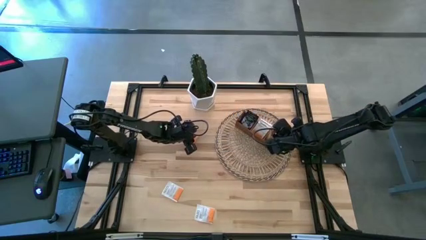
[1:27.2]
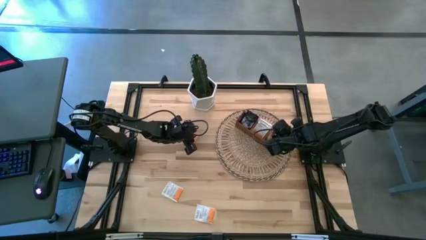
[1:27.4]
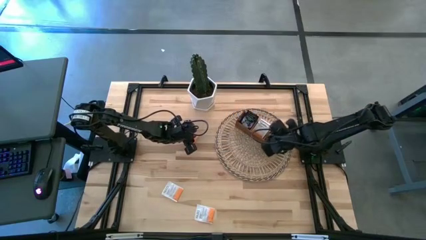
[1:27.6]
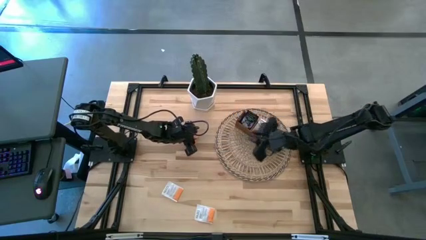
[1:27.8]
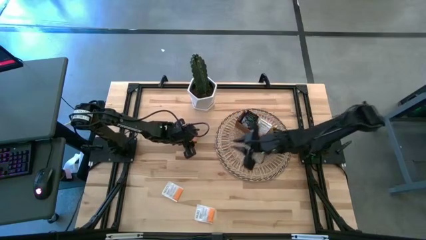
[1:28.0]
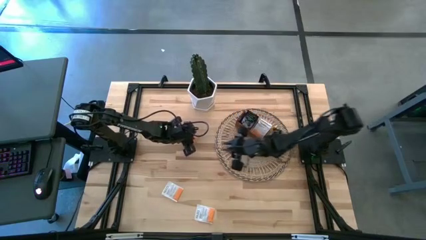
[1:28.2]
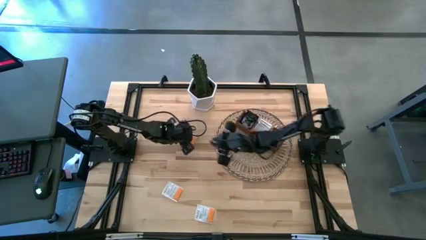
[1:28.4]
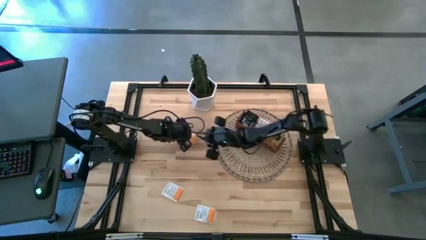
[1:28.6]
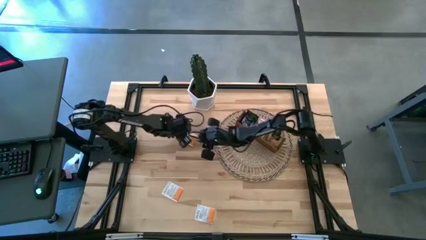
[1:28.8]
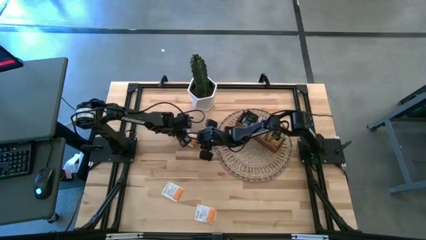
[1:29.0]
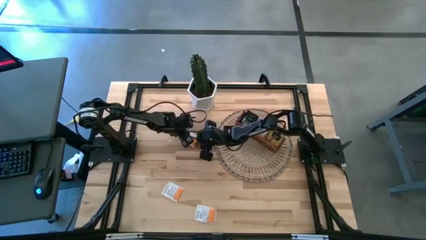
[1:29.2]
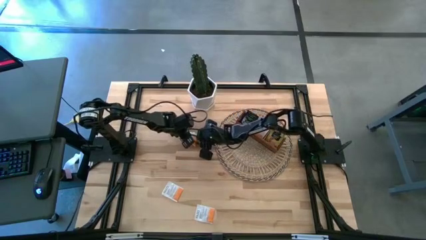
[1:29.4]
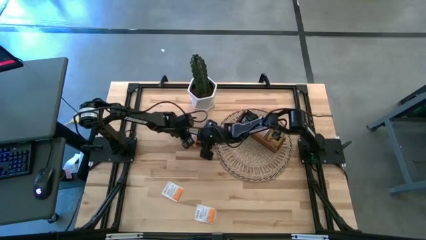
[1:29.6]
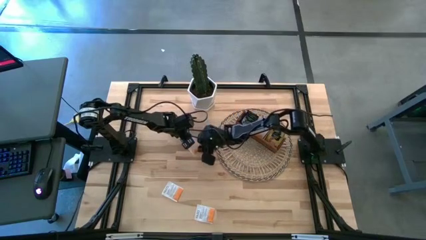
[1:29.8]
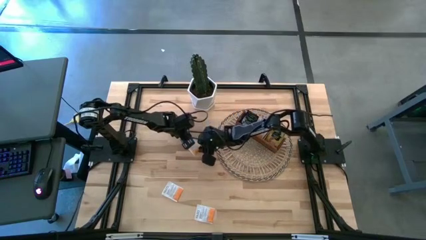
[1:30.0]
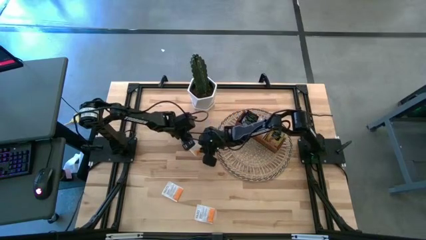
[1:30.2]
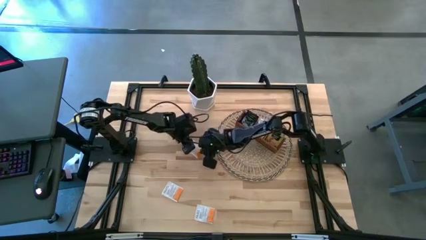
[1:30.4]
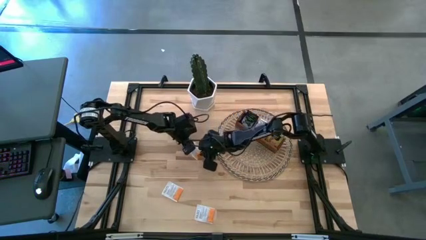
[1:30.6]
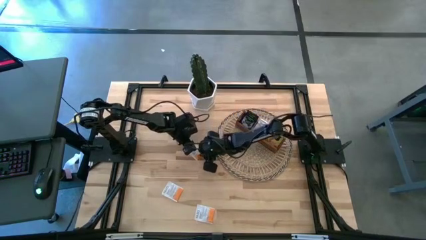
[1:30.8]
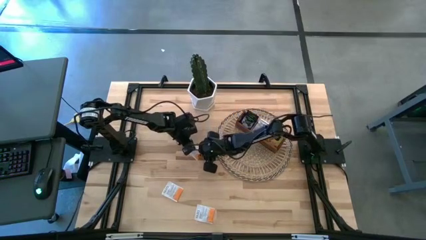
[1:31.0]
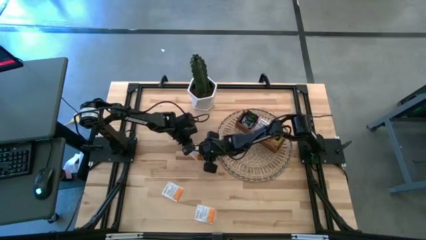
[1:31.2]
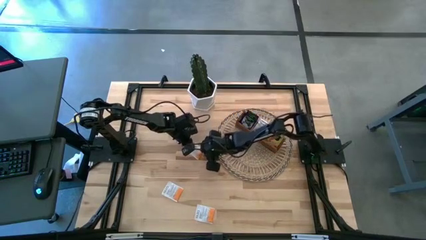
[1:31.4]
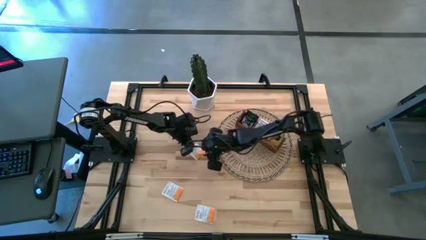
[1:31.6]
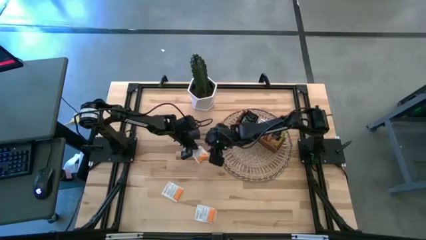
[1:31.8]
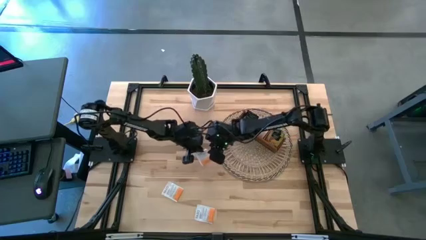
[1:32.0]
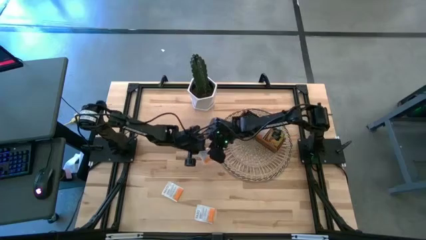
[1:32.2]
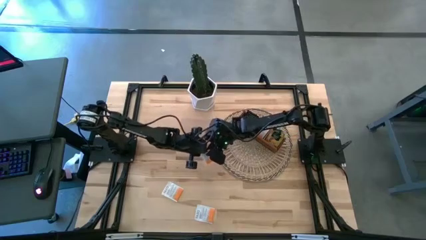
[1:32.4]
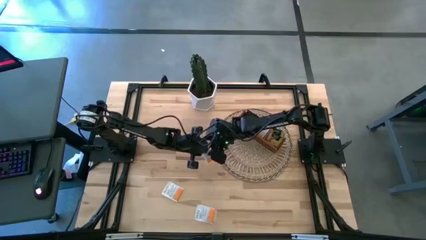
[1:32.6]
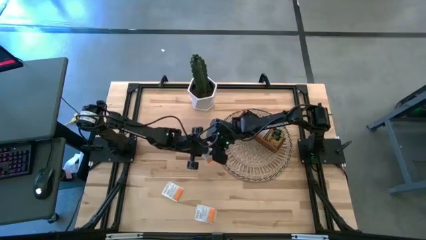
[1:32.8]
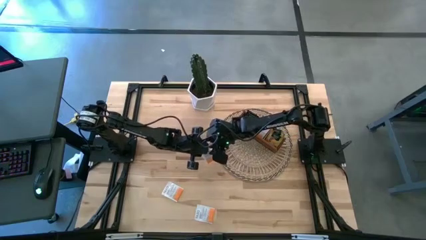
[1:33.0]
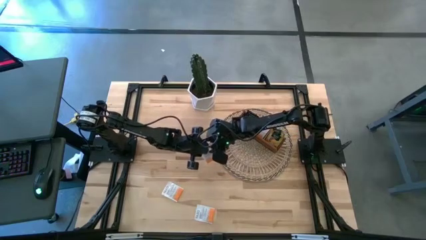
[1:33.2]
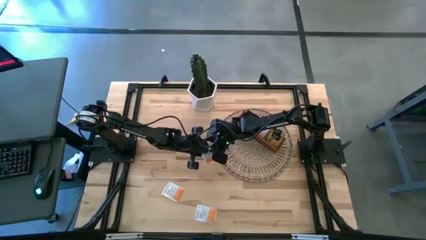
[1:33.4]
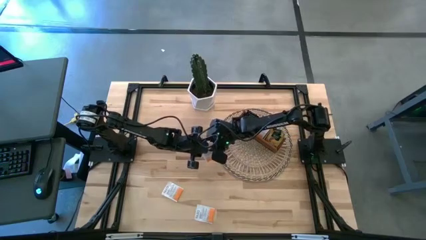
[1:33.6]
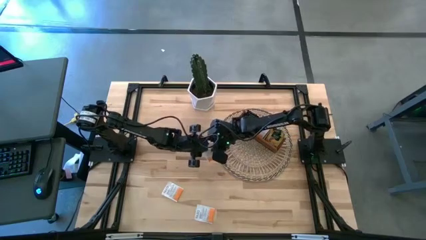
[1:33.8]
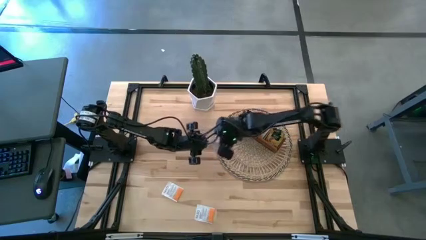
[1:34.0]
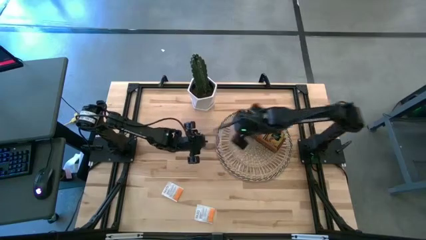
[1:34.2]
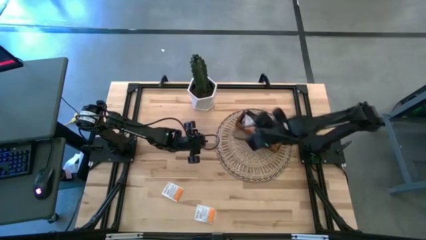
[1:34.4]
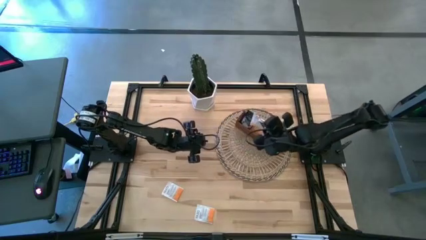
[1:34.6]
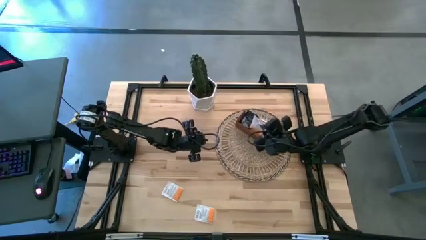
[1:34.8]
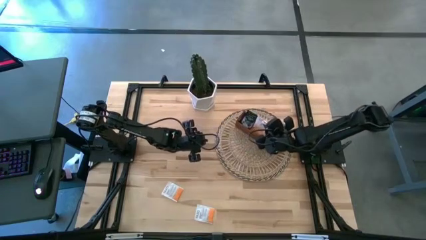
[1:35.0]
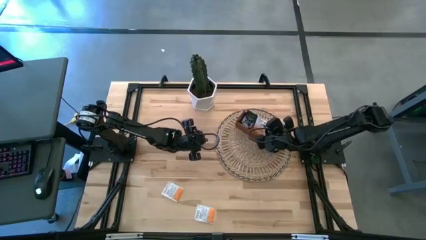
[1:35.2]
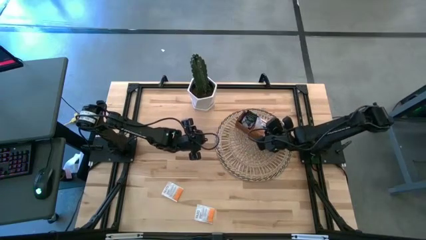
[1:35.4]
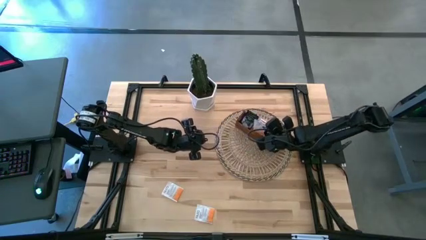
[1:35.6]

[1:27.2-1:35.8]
Task: Pick & Place Tea
Put the white tea bag into the middle section of the wooden organizer

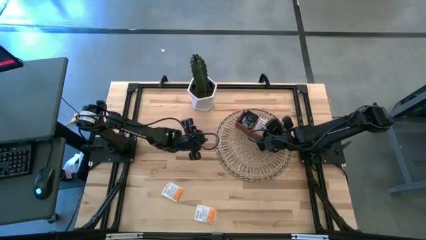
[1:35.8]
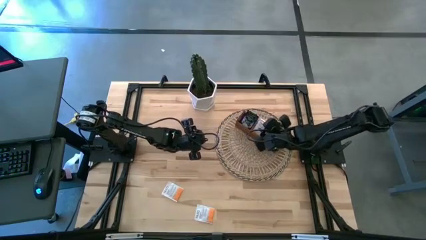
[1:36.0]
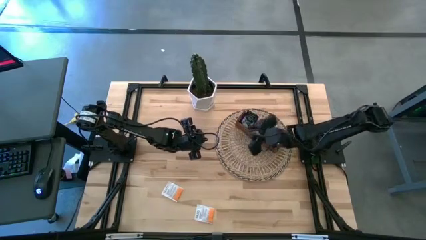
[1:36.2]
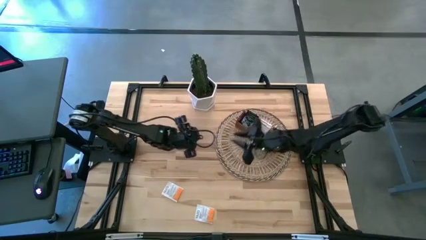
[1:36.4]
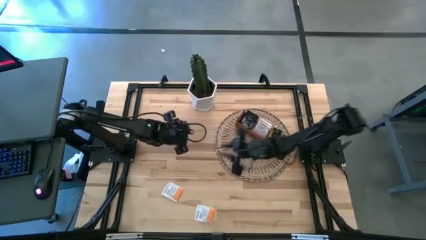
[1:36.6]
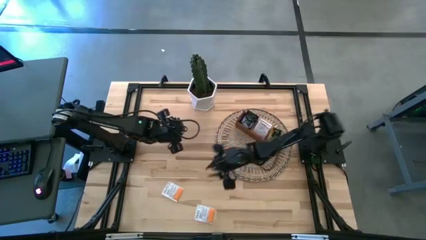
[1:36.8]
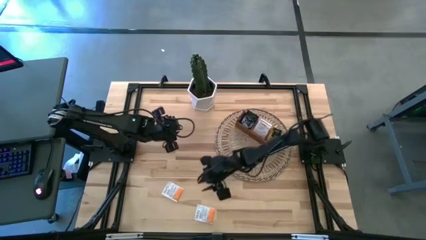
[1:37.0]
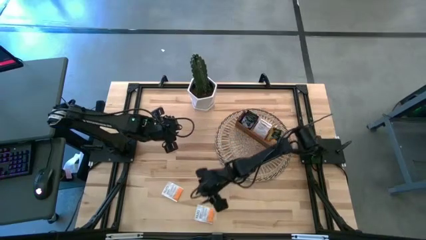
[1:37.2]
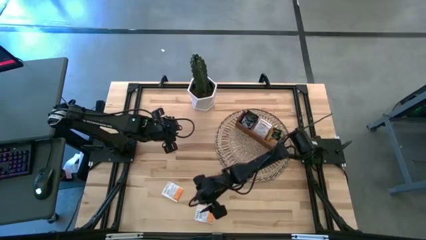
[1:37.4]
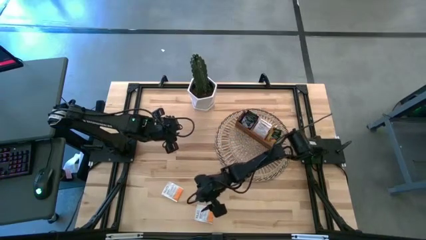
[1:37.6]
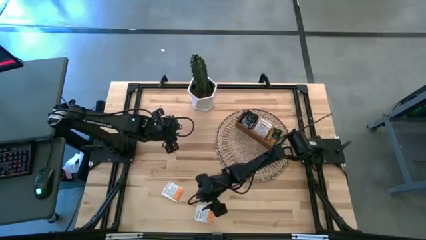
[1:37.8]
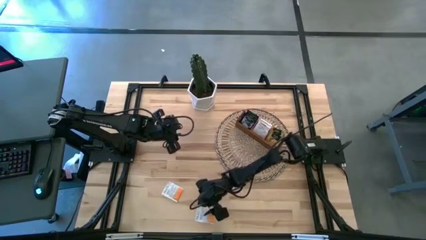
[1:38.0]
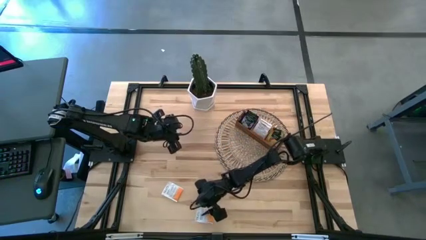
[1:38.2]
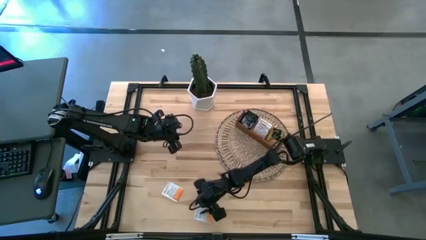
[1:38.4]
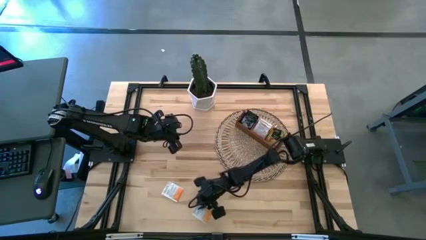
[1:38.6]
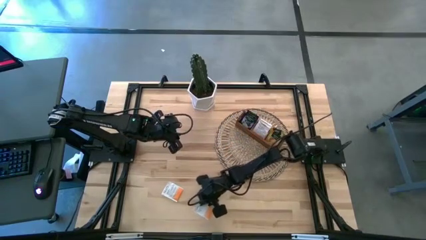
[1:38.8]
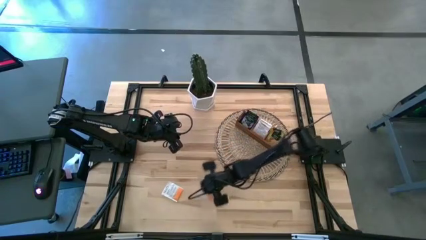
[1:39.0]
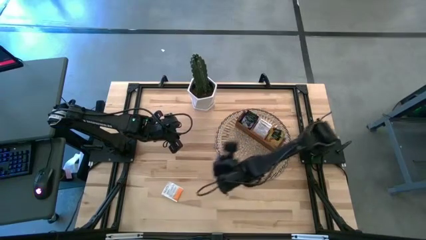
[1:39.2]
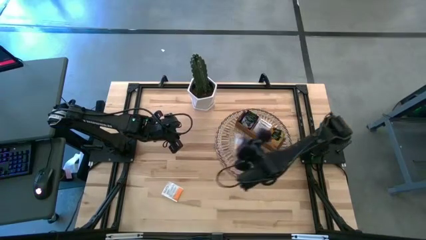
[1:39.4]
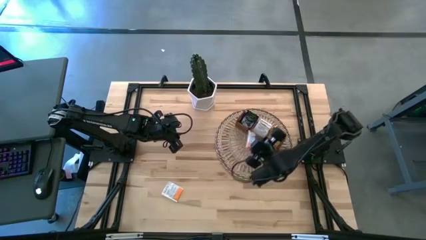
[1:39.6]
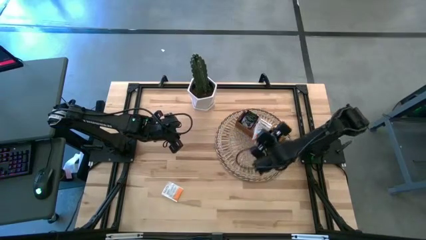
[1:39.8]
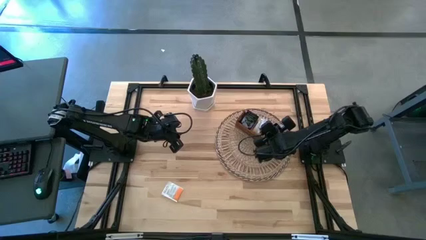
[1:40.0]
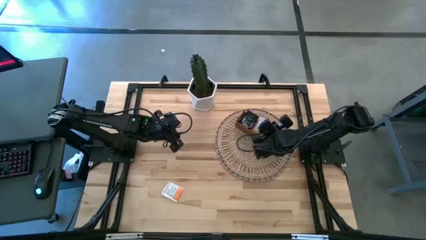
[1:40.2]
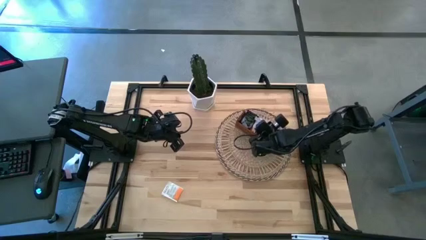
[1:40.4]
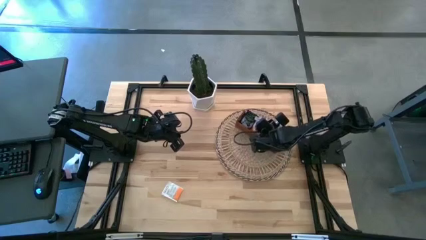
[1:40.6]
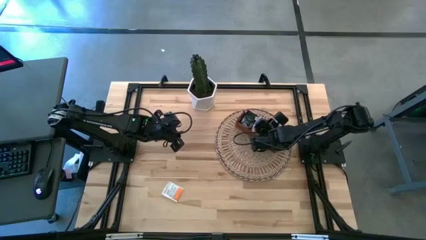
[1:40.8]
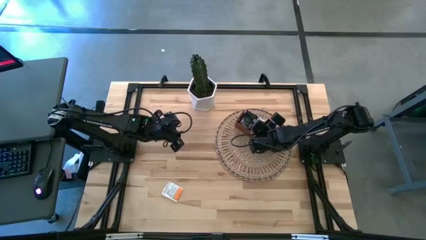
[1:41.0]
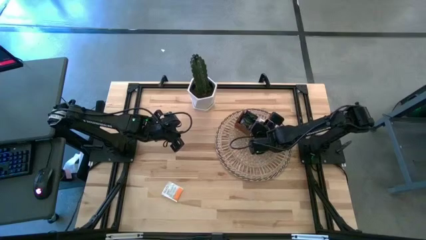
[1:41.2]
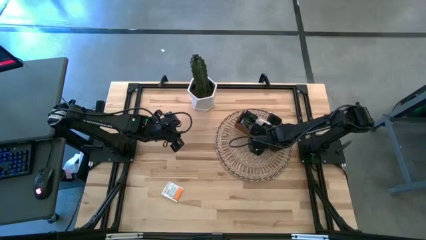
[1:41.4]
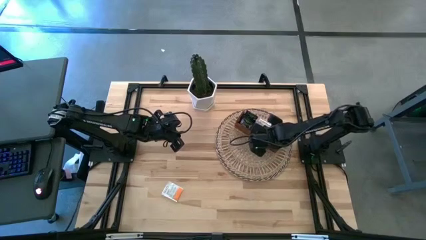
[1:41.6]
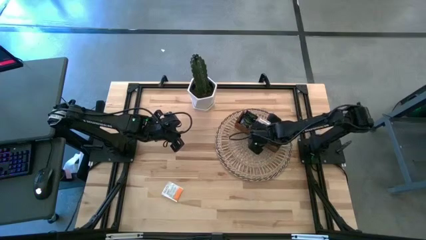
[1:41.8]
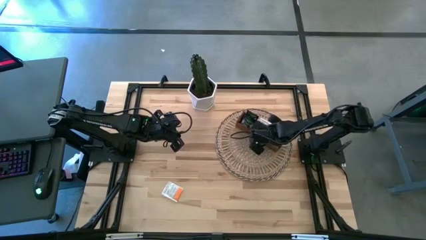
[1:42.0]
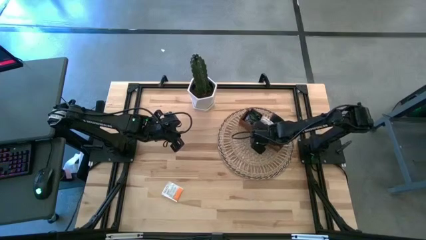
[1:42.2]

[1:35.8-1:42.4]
Put the white tea bag into the middle section of the wooden organizer
